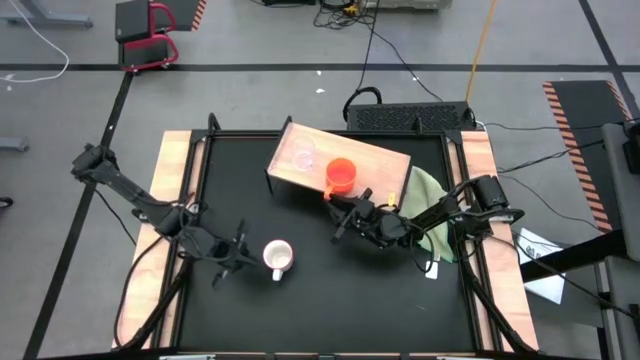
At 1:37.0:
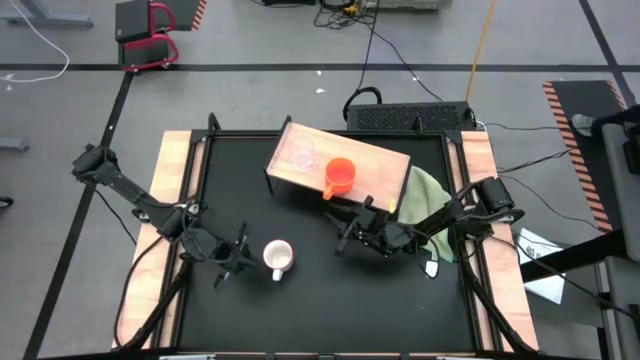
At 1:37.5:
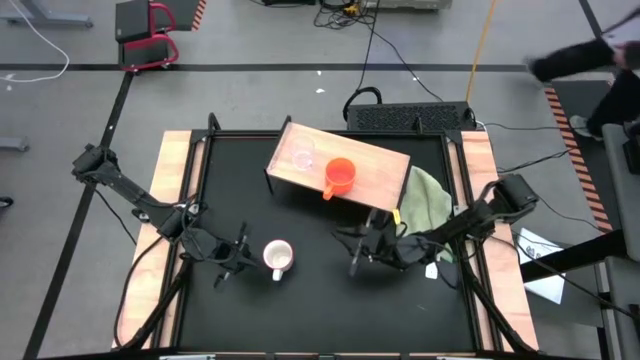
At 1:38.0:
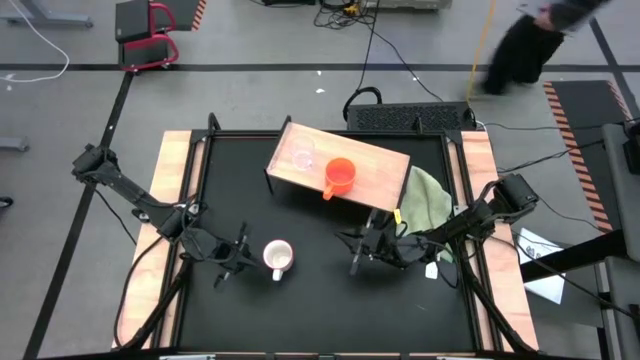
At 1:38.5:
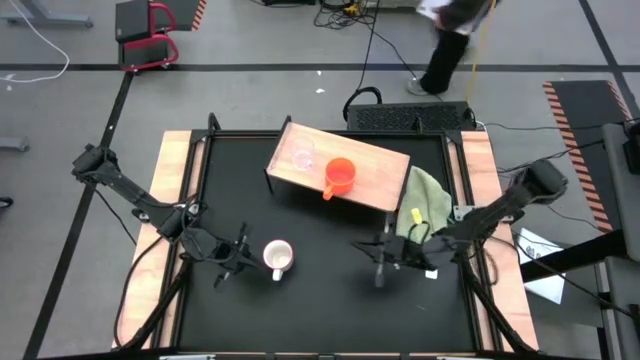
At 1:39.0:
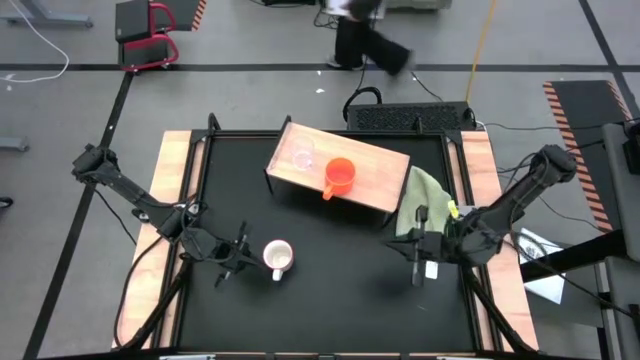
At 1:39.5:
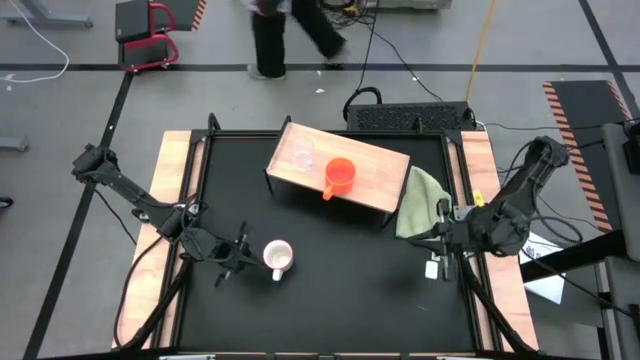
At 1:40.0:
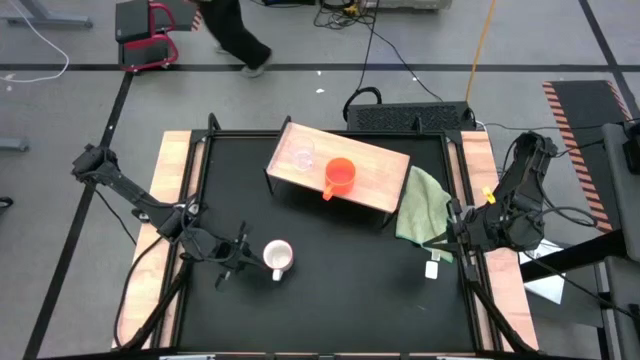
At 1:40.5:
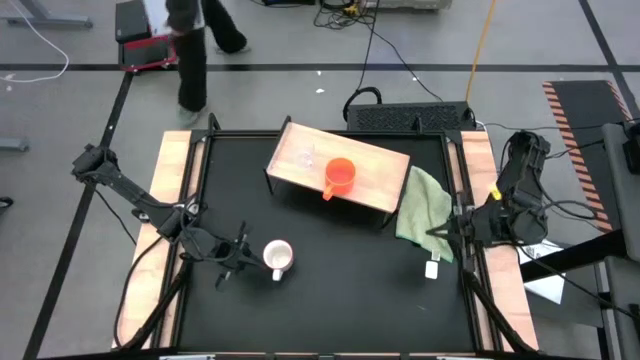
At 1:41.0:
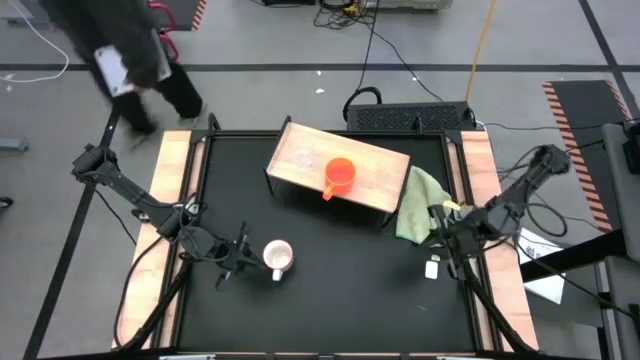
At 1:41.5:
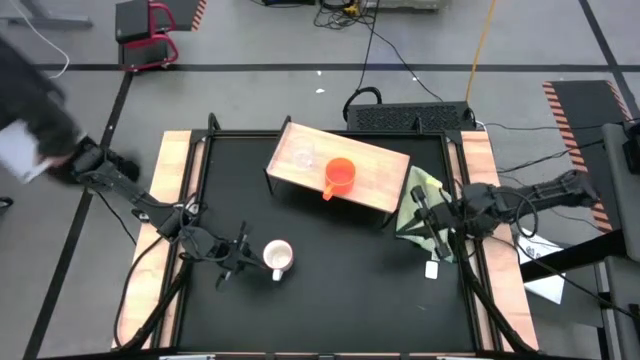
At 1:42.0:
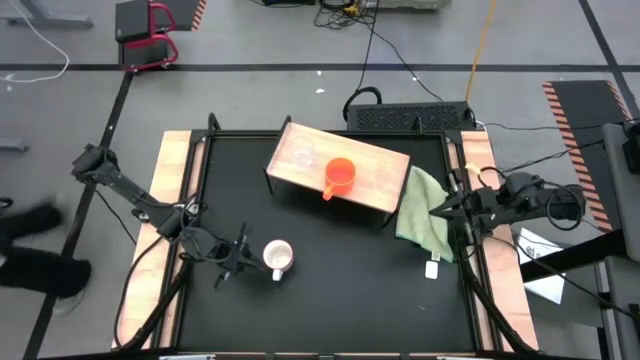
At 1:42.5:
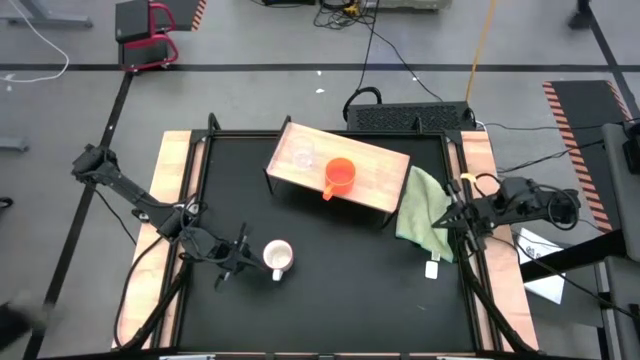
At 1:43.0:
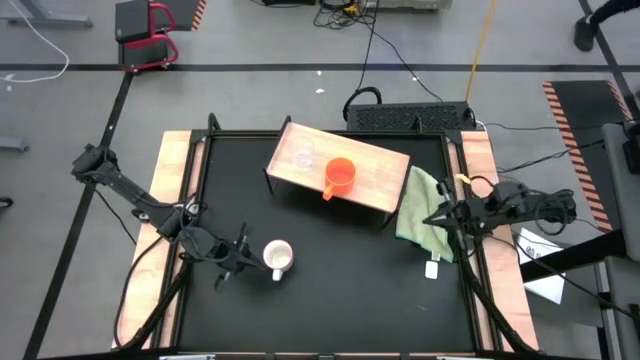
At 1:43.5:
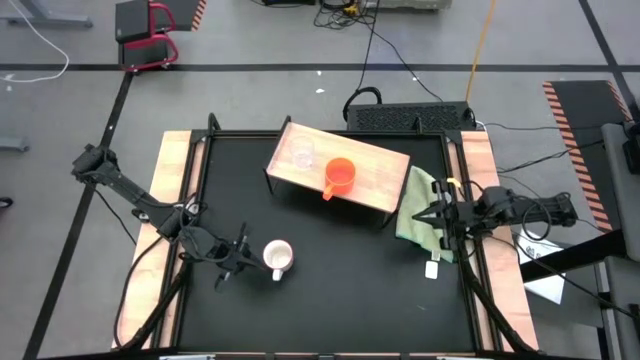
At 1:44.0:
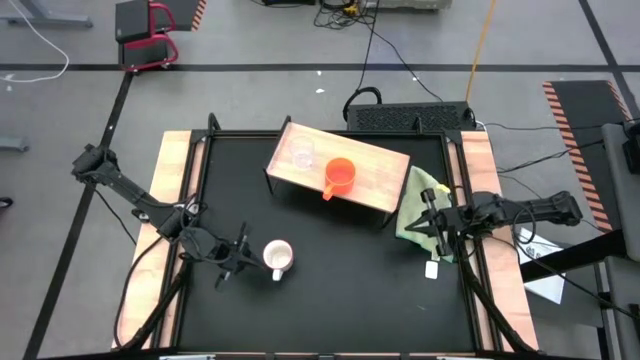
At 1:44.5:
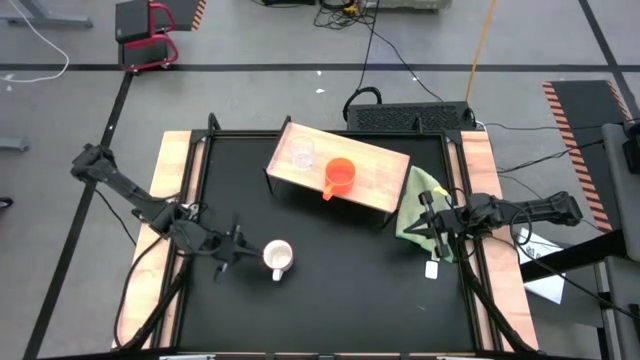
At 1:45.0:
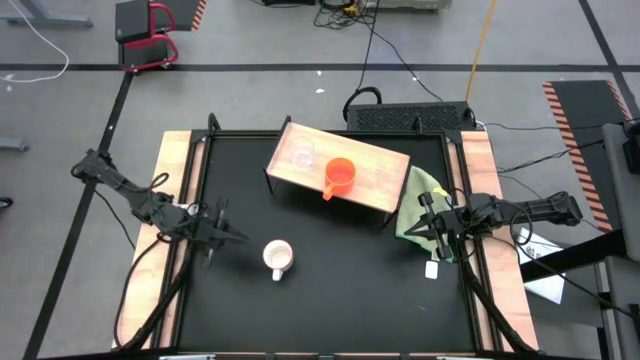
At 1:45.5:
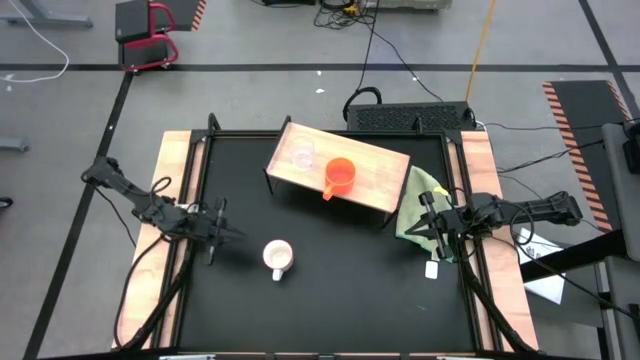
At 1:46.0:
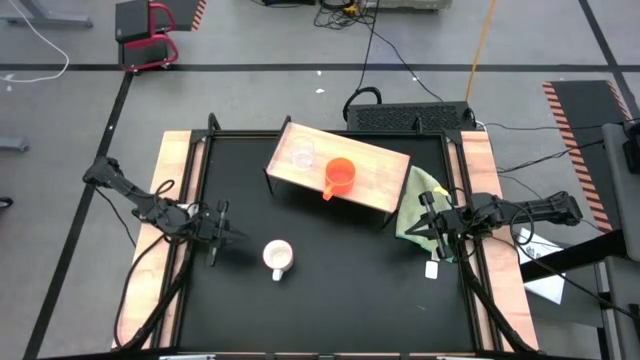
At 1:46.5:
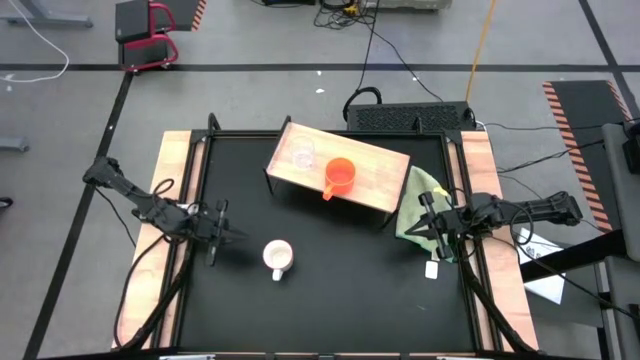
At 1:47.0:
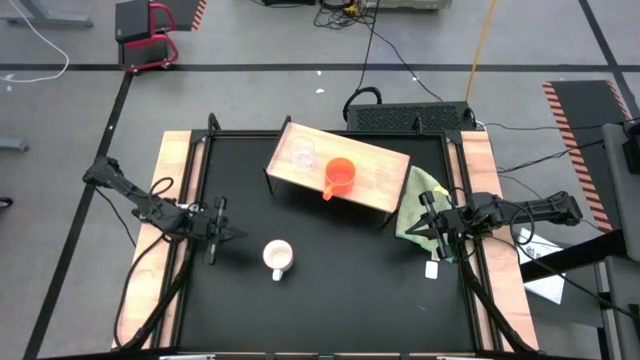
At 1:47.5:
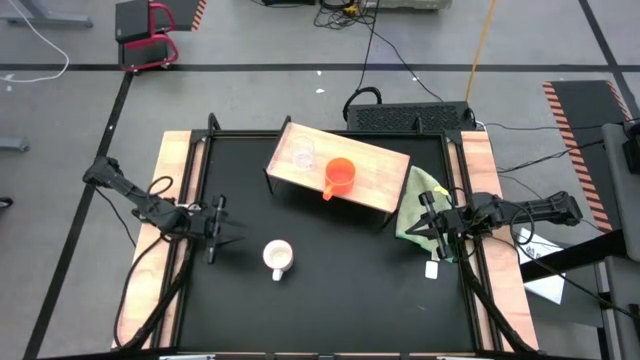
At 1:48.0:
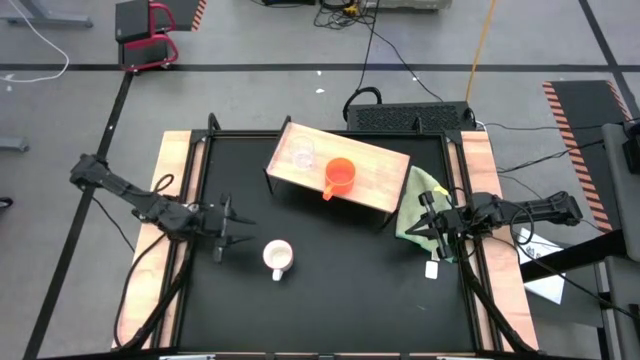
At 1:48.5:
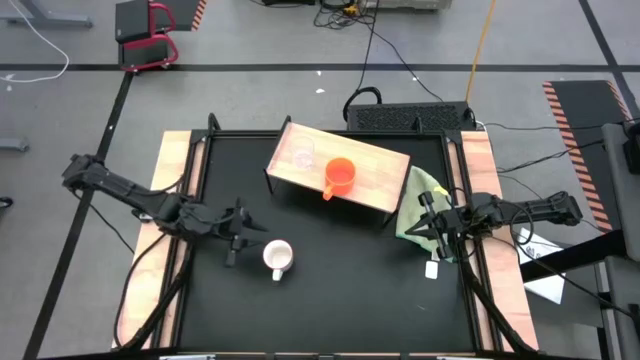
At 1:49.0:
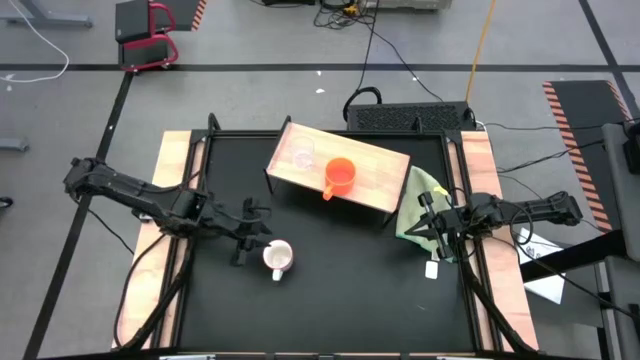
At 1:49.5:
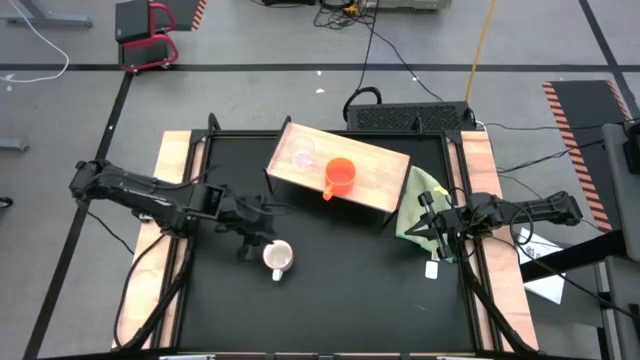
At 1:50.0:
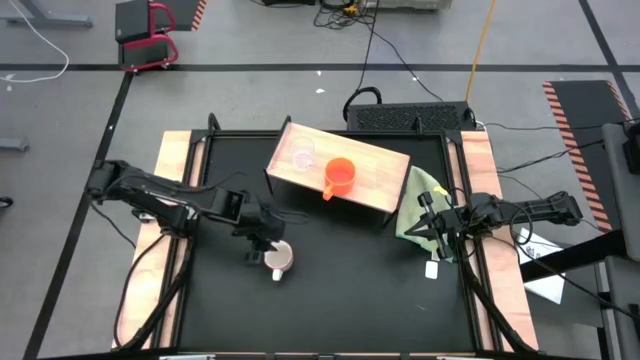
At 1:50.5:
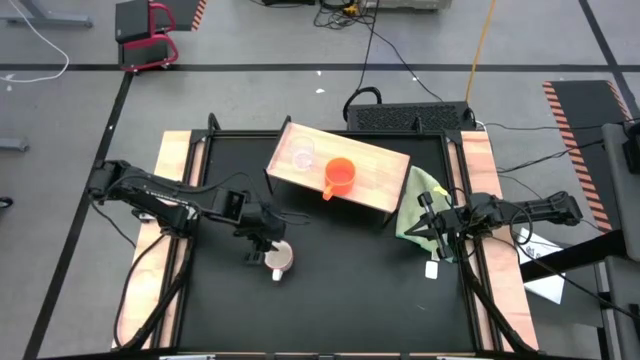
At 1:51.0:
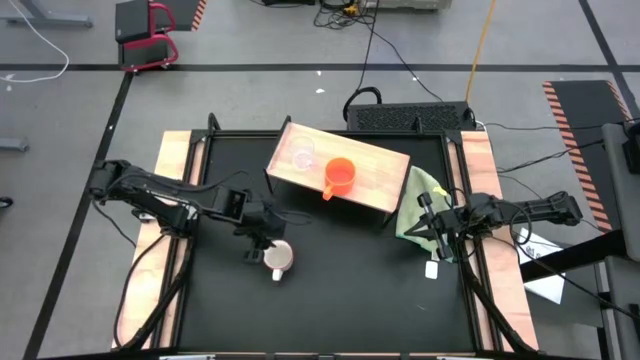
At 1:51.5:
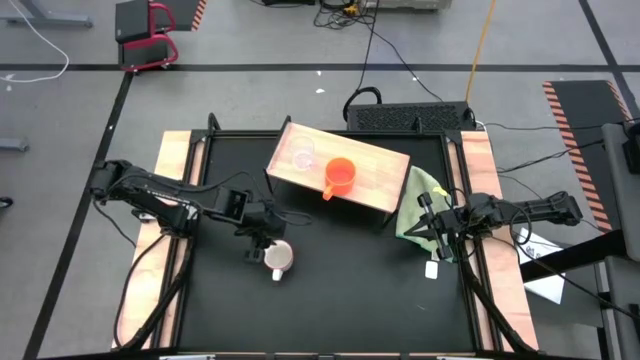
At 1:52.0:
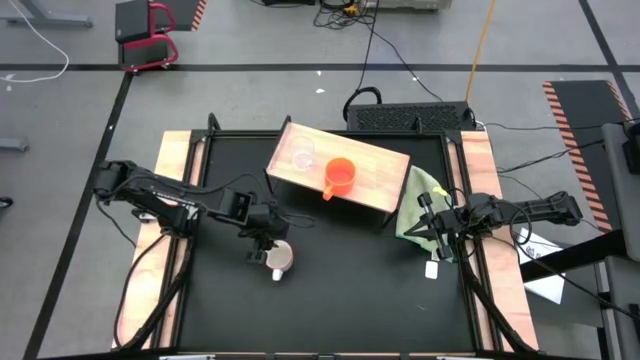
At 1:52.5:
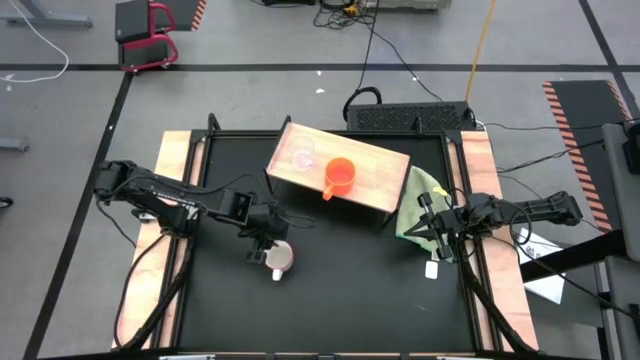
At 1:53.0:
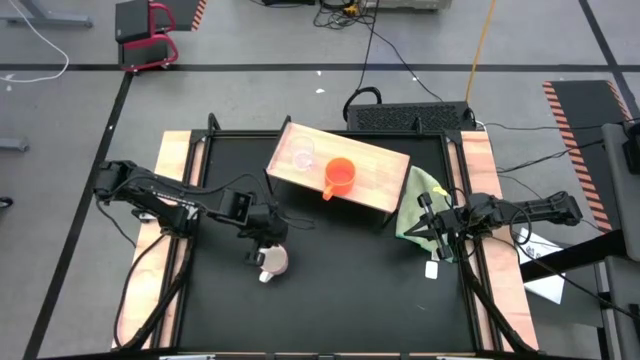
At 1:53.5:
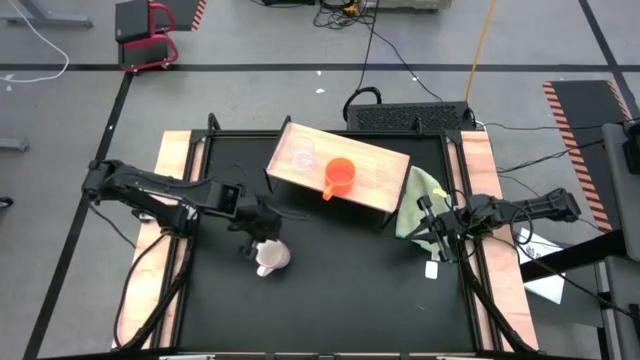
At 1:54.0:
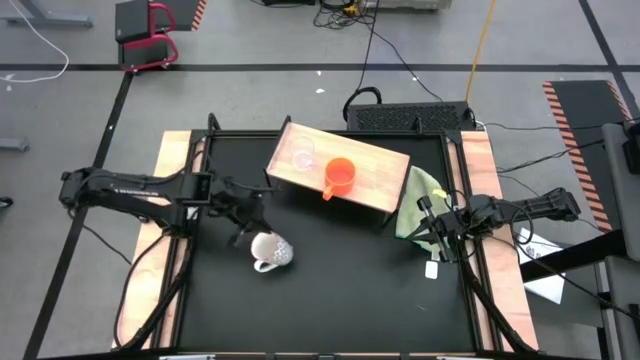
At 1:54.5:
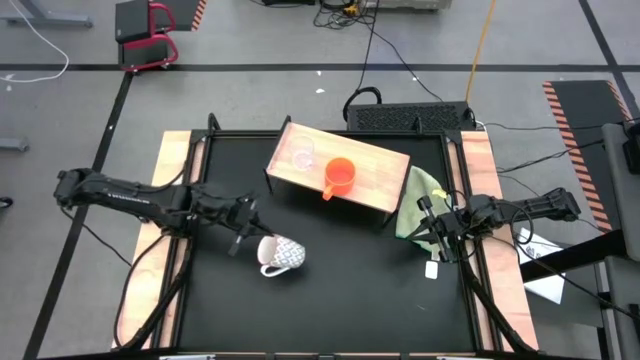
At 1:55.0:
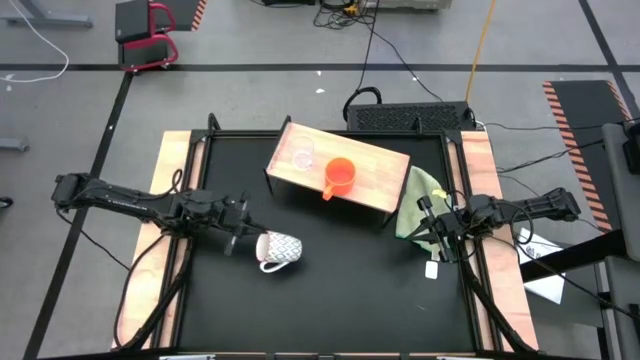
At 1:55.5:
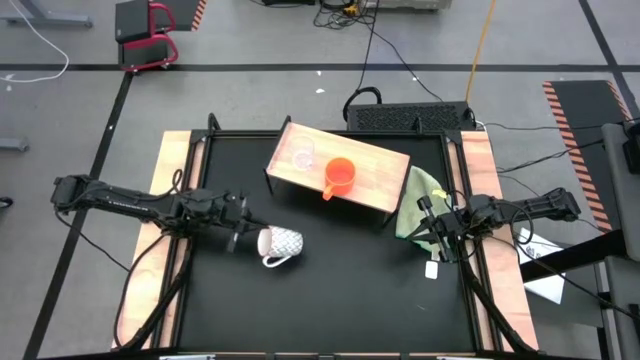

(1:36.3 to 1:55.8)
Task: Stack small to large cups/mugs on shelf
Put the gray patterned mug on the shelf
